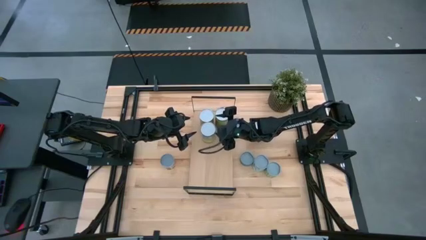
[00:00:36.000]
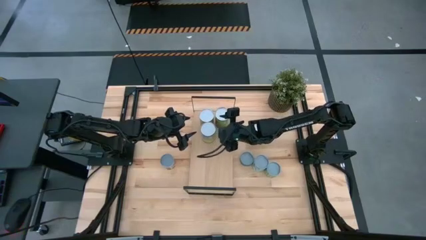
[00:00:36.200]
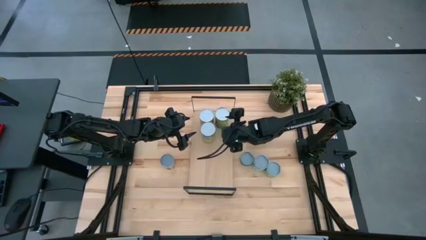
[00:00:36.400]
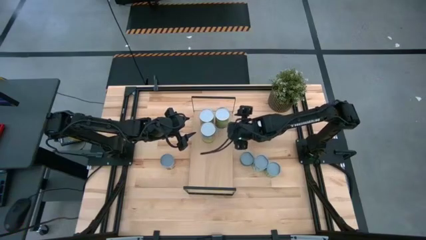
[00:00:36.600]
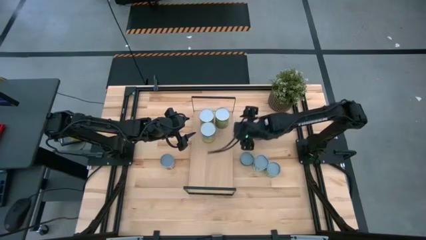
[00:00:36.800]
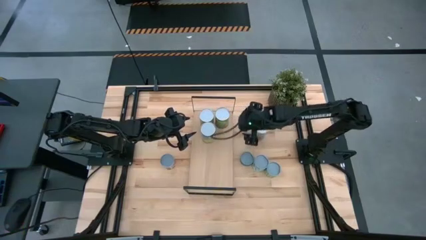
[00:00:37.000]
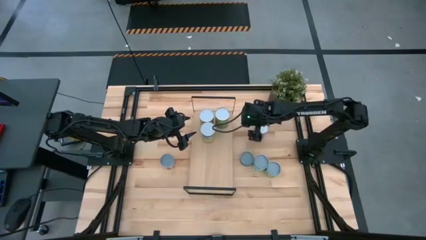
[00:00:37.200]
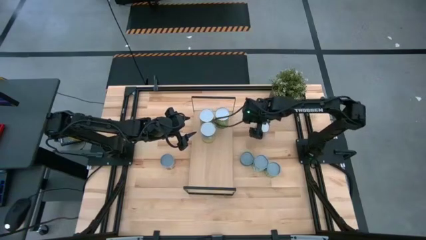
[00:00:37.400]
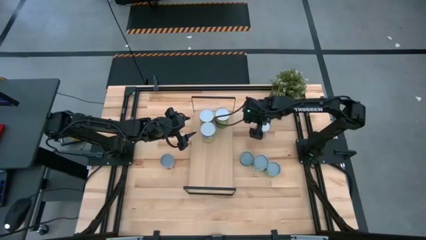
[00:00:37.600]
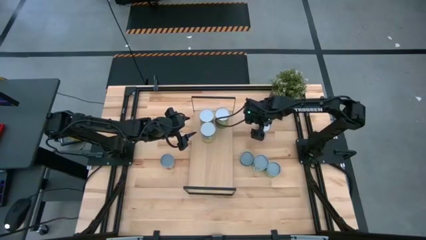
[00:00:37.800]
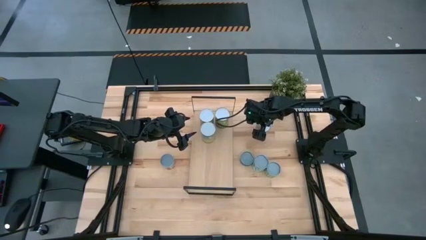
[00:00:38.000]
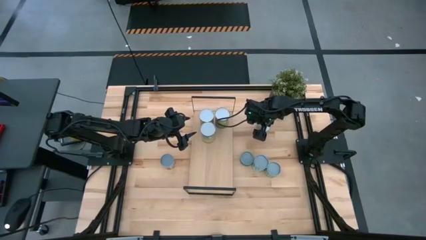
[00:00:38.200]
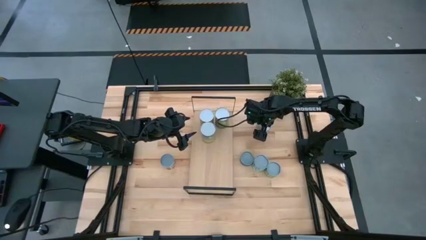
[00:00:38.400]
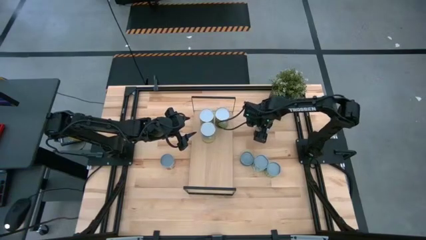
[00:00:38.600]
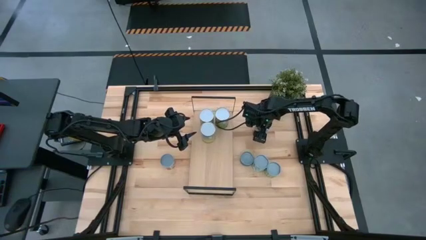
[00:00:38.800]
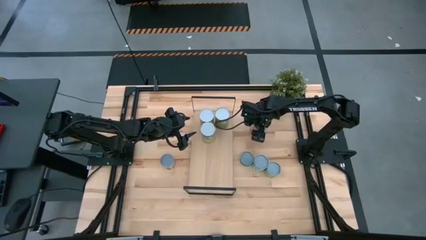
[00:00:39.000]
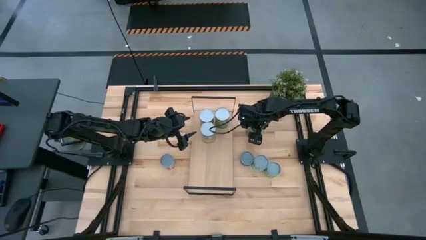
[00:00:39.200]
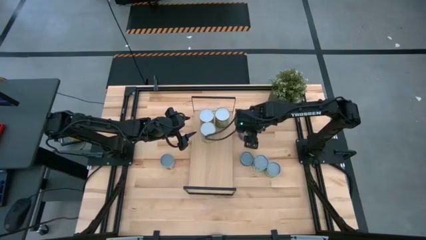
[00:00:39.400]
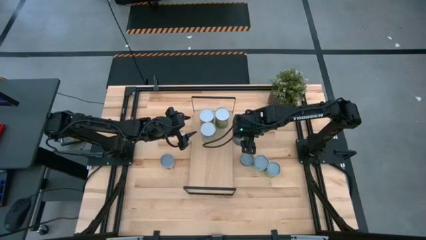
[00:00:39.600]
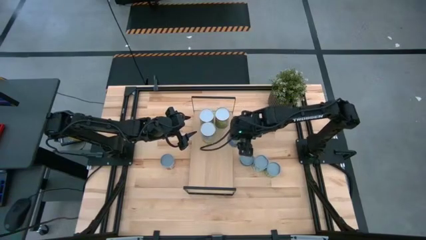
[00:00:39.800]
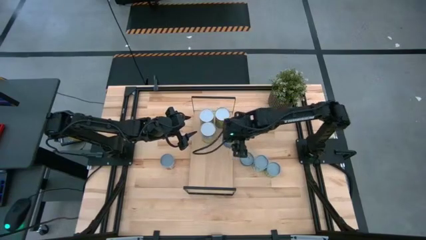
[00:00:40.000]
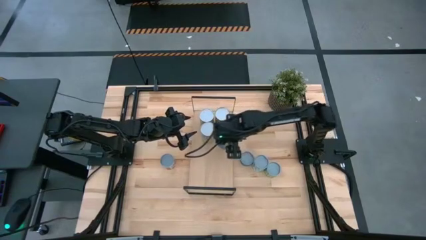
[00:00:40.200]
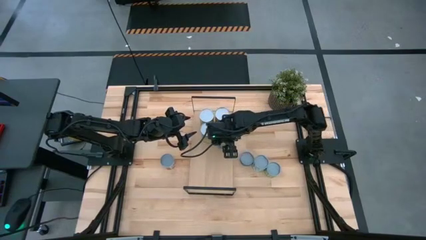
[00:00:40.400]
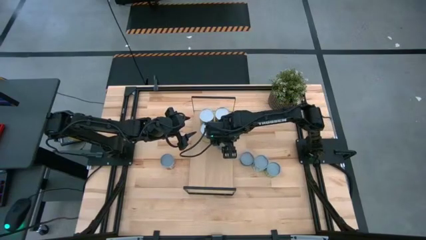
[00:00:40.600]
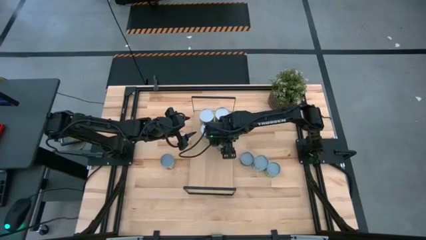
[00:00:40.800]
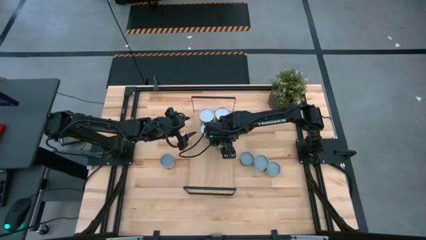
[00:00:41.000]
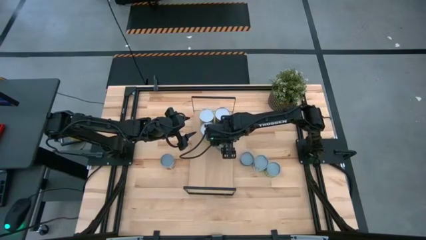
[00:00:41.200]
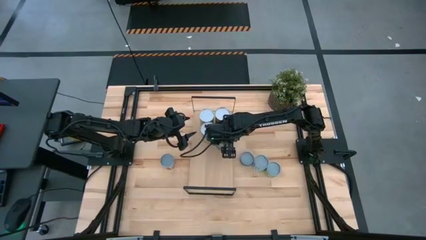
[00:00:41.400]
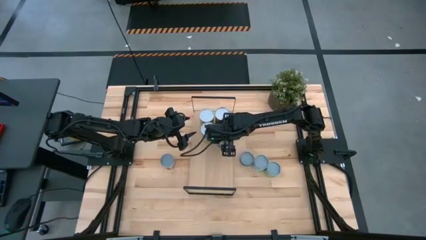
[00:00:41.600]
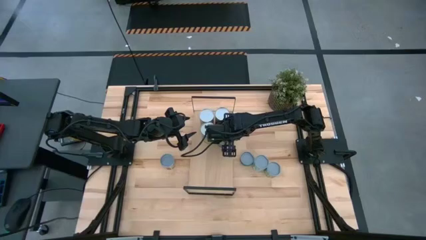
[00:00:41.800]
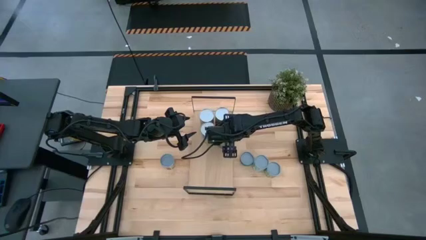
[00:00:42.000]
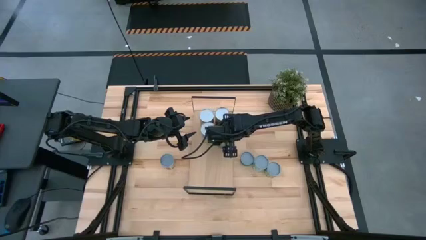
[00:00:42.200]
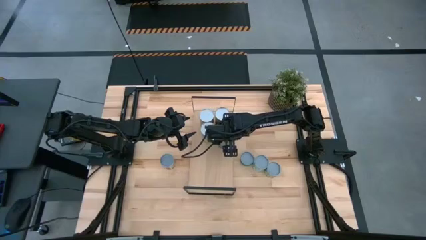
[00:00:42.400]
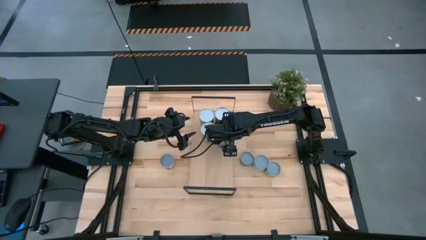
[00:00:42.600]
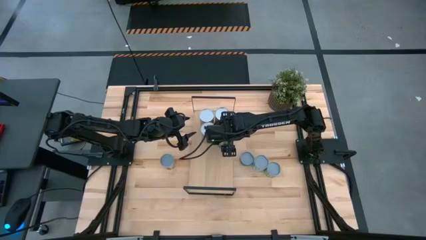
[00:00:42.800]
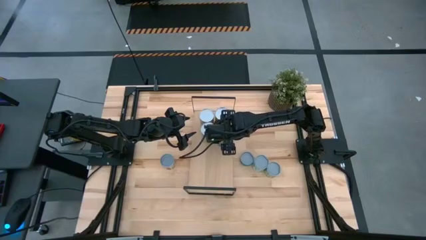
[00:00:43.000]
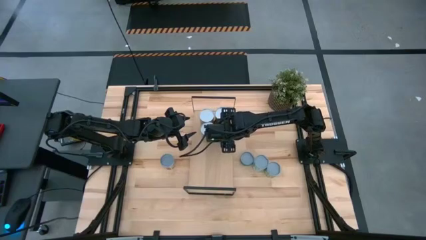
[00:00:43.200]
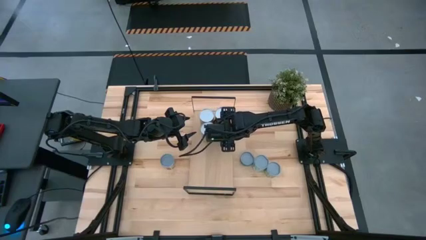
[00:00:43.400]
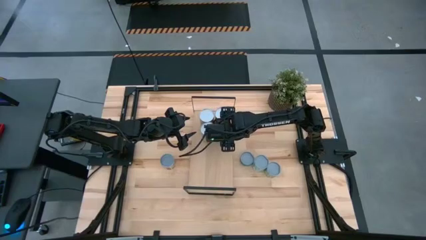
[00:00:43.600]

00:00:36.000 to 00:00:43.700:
Task: Pick and place cans onto a shelf
Put the canned peas on the shelf

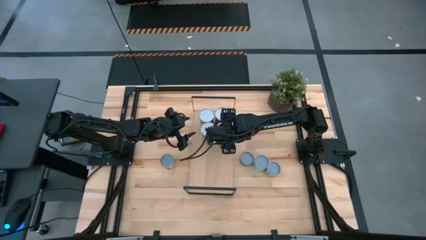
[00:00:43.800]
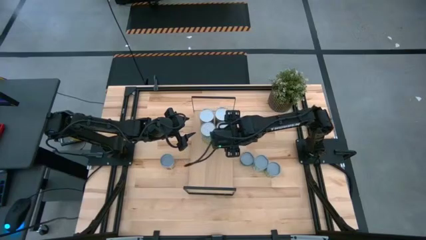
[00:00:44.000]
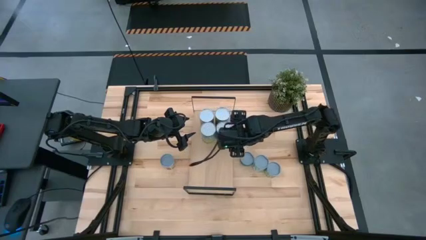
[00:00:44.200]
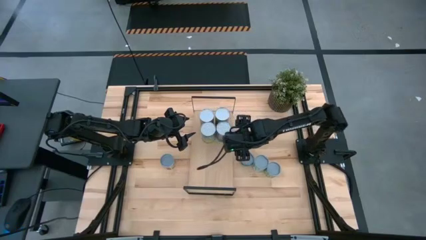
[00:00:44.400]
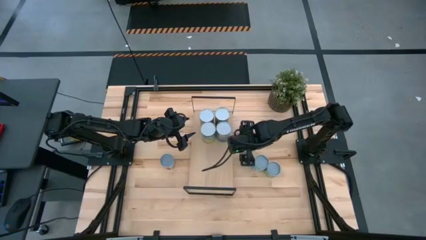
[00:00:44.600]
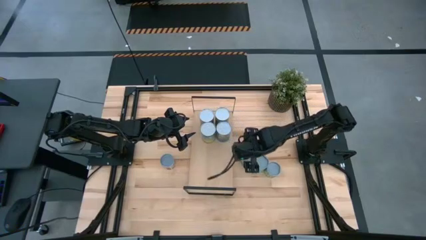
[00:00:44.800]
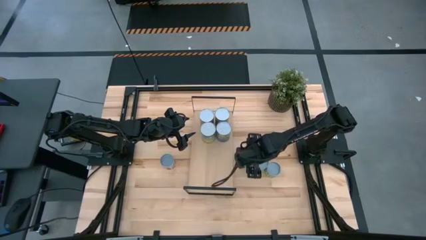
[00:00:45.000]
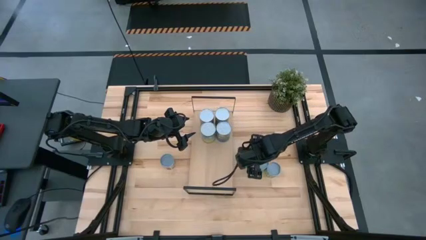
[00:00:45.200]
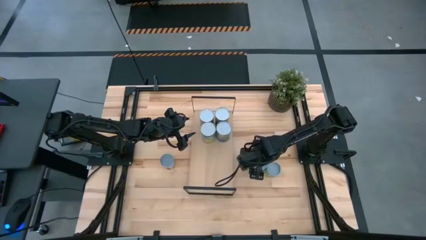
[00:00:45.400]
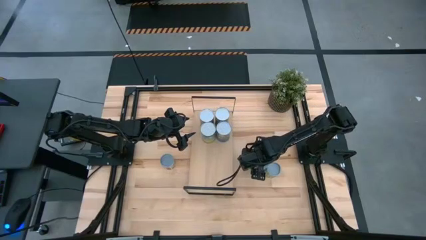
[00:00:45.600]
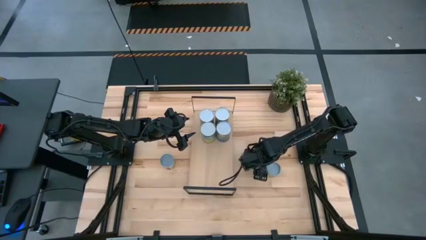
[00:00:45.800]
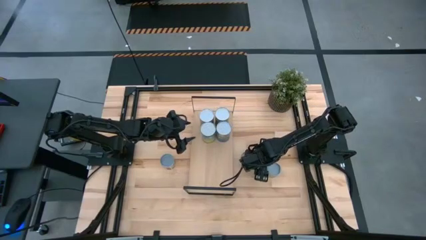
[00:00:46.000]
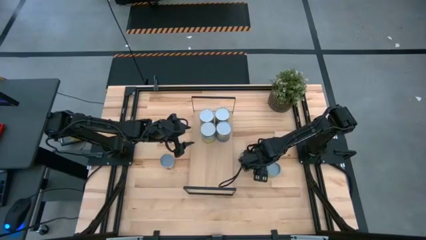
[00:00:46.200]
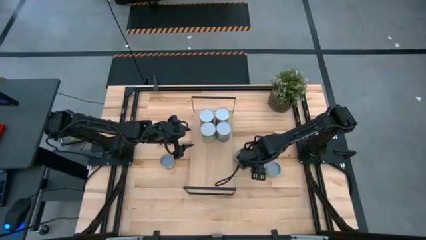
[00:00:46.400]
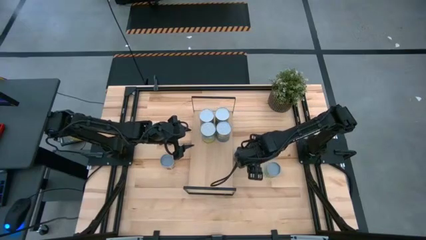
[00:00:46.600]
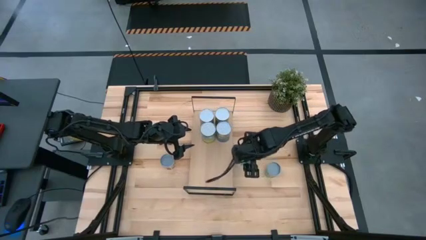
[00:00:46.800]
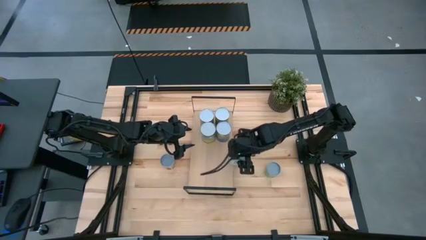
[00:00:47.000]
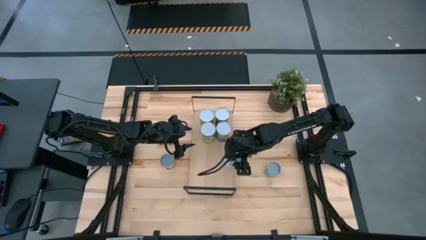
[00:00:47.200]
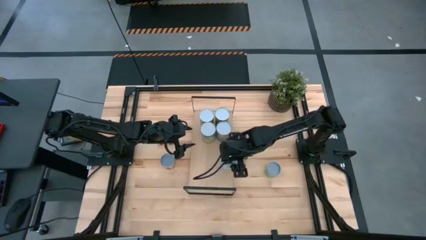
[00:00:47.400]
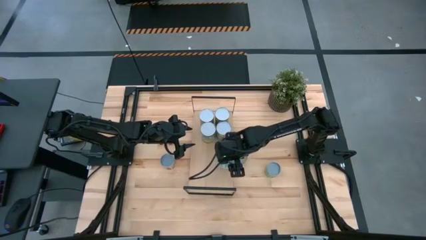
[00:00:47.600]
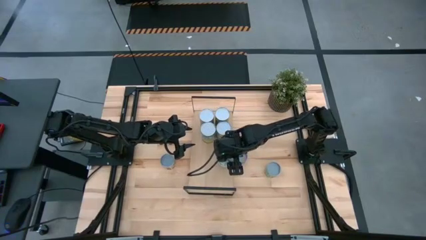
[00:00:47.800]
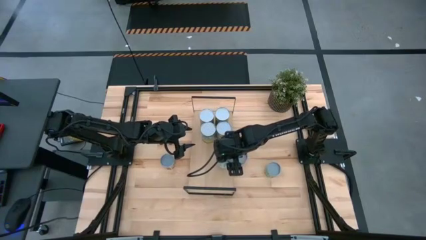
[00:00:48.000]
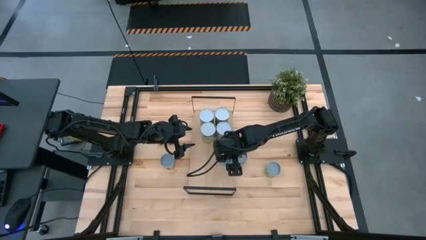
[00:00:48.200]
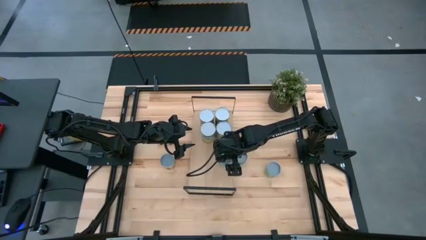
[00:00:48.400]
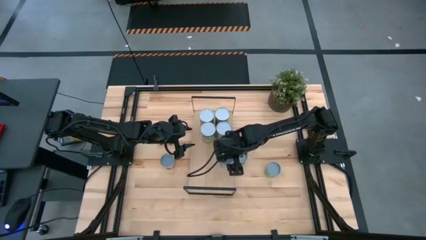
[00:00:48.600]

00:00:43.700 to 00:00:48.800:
Put the canned mixed vegetables on the shelf
